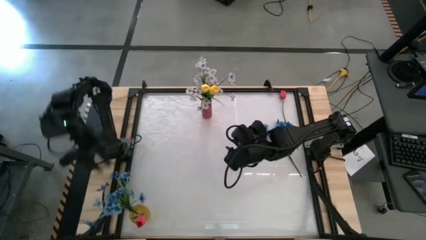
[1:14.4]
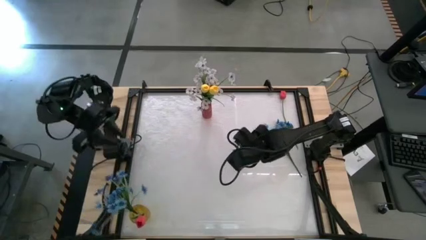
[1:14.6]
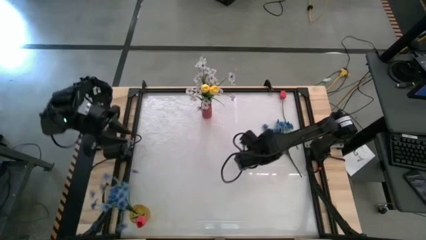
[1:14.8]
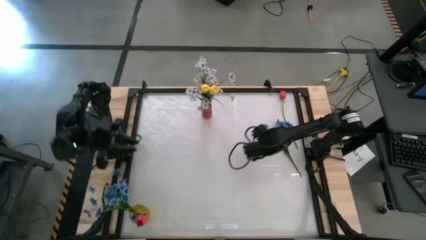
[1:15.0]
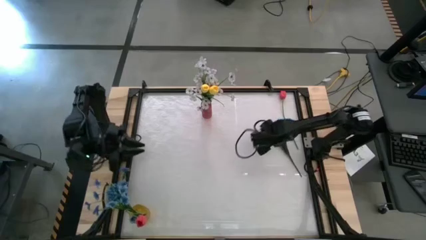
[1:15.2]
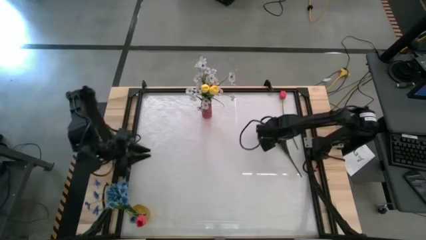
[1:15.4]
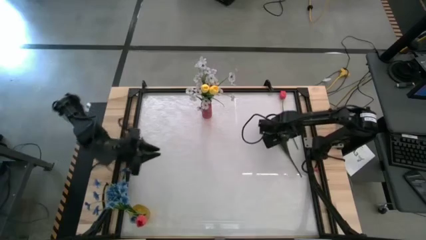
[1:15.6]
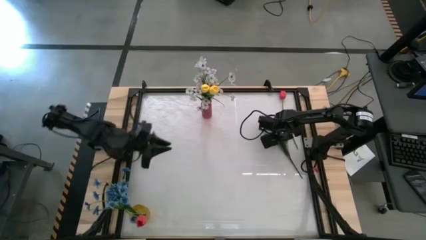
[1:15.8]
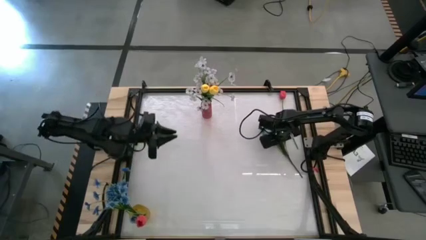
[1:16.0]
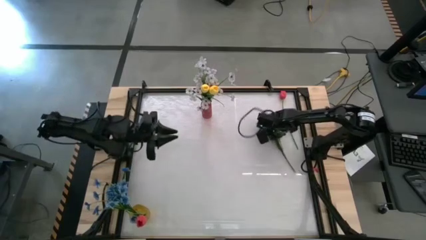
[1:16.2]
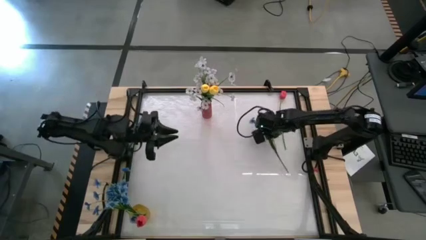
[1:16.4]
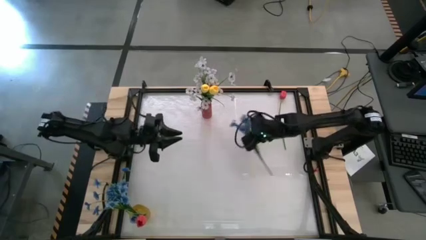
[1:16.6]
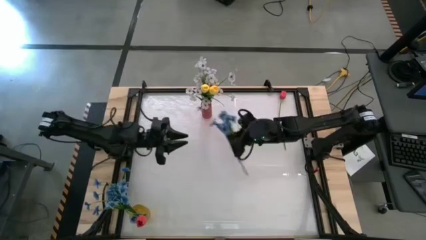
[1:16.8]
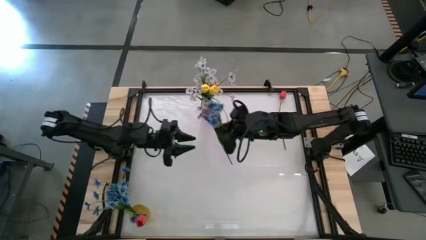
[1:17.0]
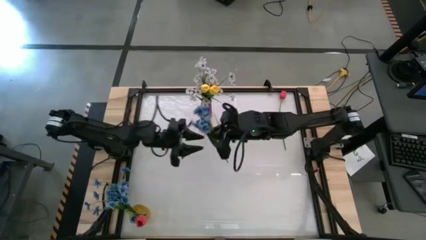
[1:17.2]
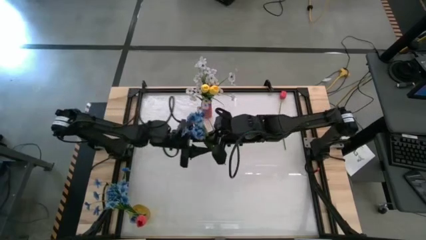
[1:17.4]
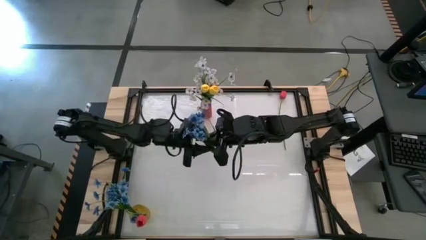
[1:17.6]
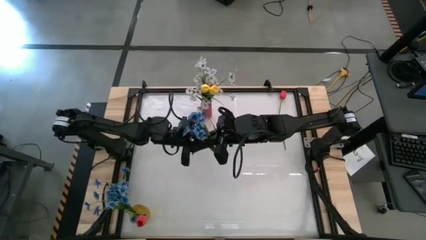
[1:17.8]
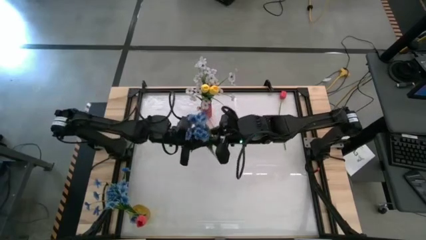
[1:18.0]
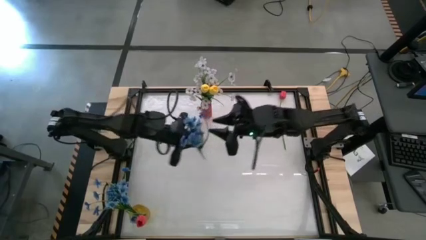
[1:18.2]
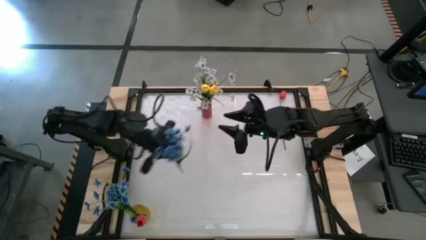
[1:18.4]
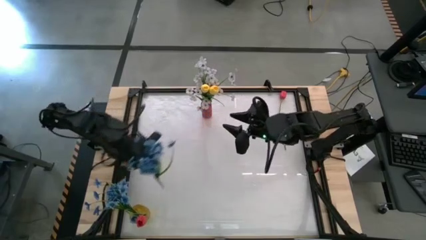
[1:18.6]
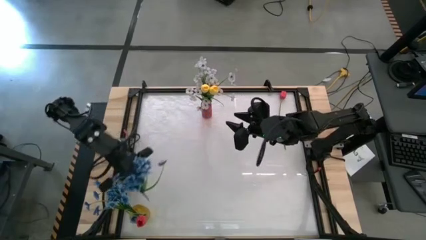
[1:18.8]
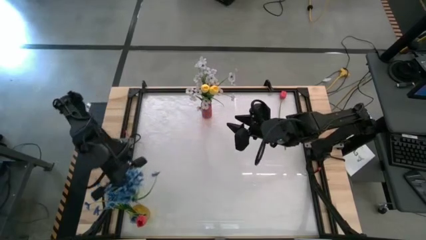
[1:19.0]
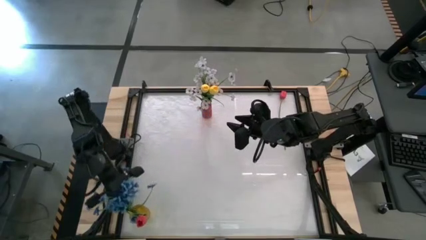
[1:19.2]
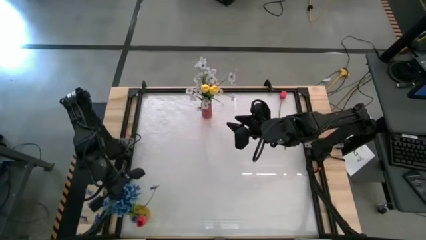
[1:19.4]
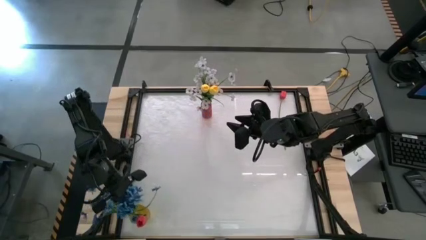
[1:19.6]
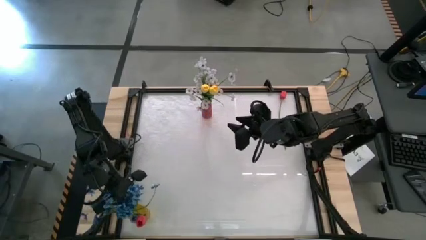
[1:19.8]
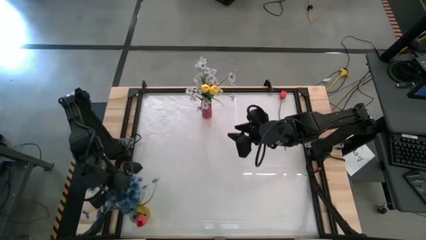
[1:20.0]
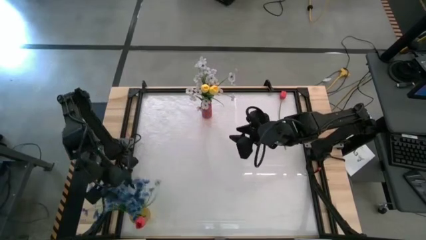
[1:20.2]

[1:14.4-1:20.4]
Task: Sort flowers into vase by color
Put the blue flowers into the yellow vase

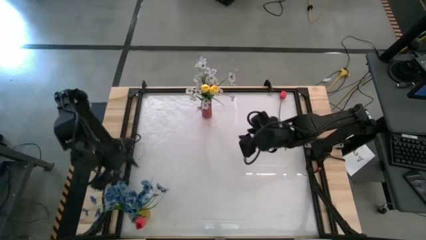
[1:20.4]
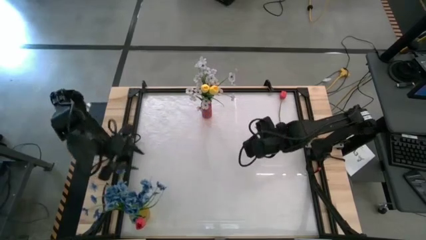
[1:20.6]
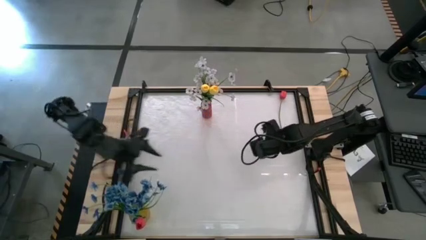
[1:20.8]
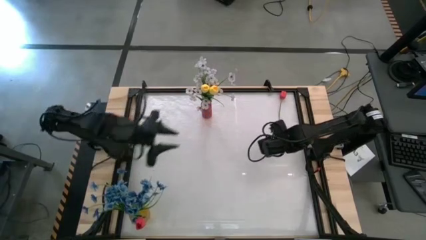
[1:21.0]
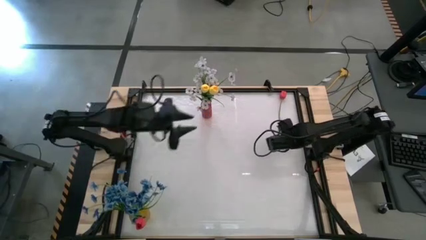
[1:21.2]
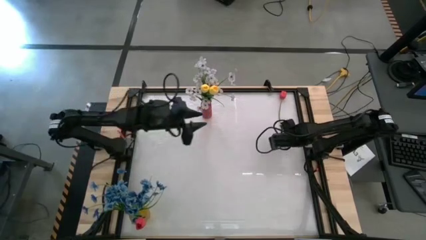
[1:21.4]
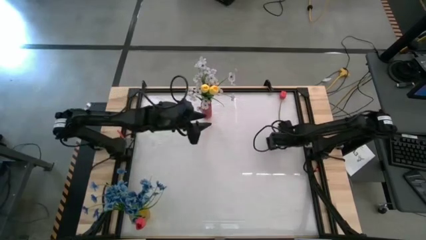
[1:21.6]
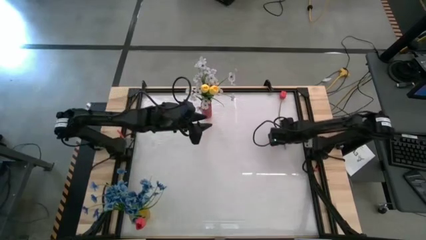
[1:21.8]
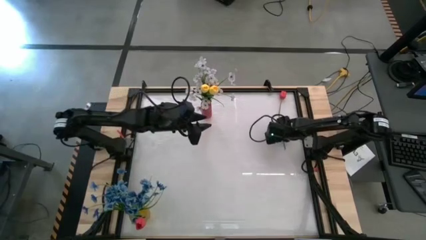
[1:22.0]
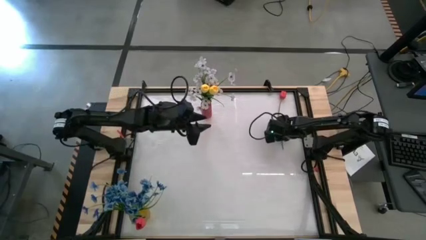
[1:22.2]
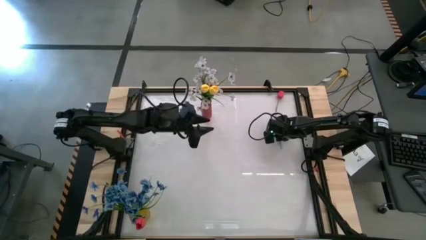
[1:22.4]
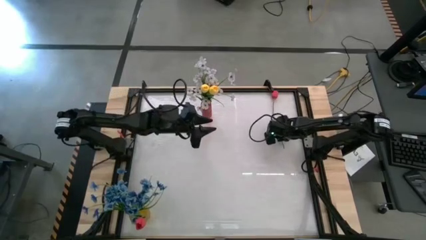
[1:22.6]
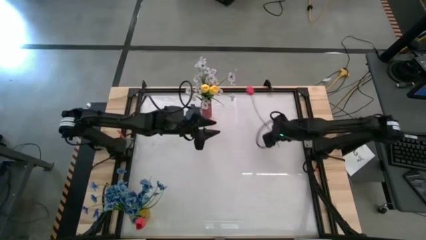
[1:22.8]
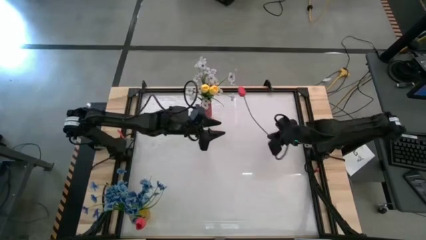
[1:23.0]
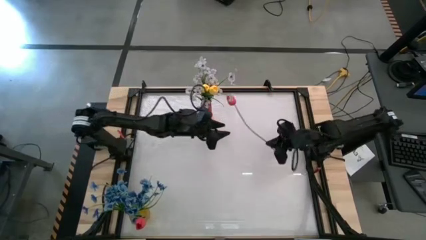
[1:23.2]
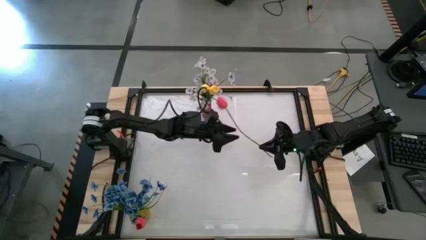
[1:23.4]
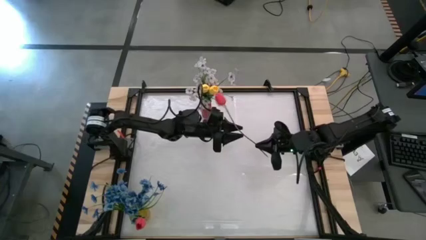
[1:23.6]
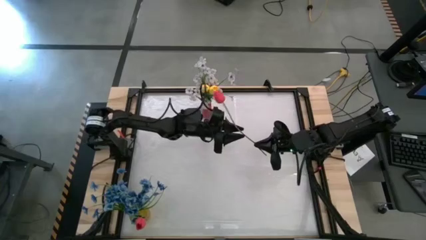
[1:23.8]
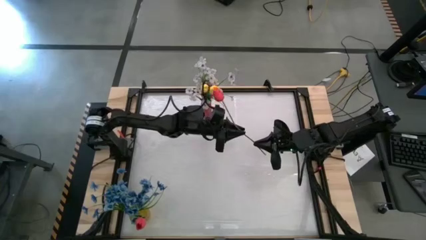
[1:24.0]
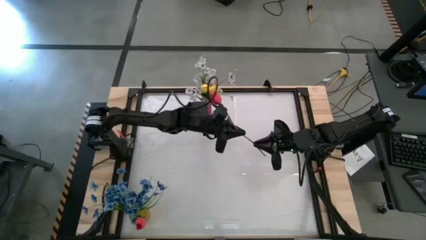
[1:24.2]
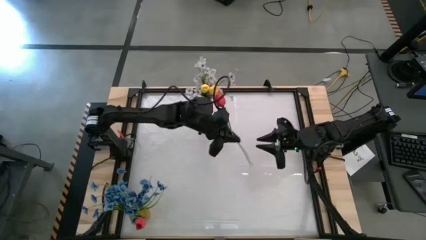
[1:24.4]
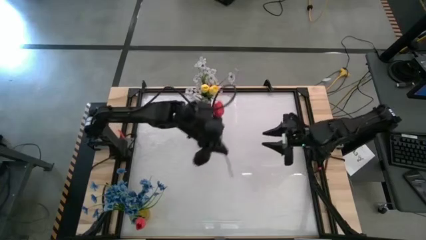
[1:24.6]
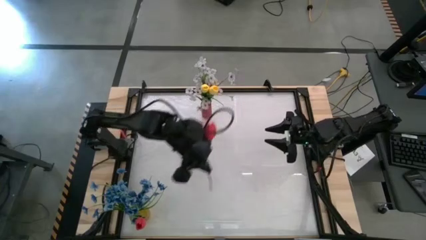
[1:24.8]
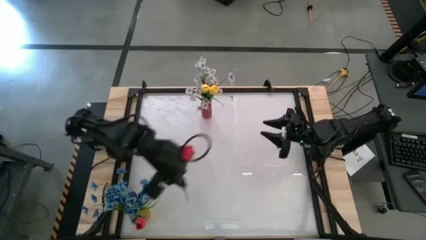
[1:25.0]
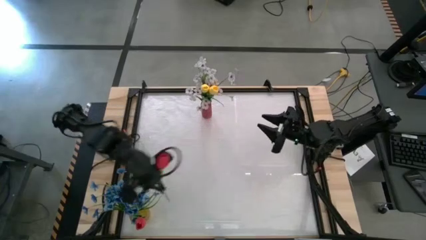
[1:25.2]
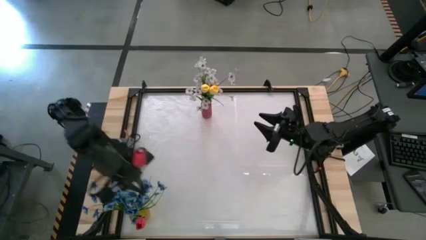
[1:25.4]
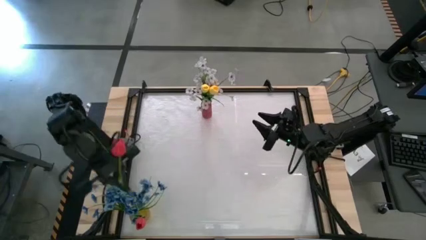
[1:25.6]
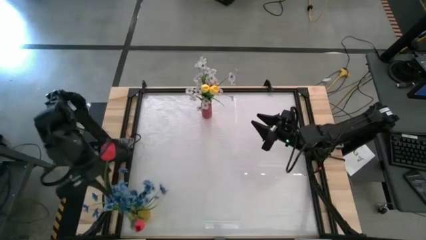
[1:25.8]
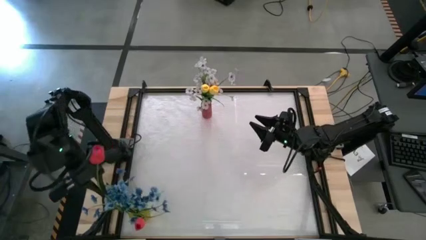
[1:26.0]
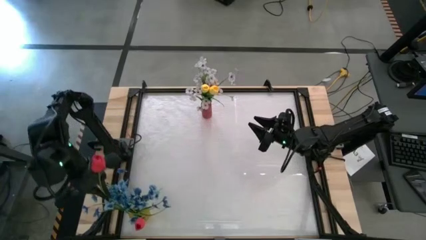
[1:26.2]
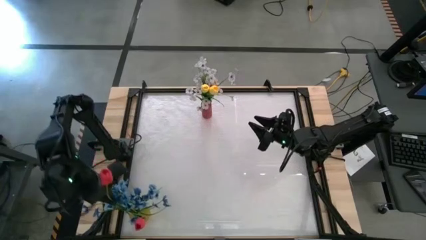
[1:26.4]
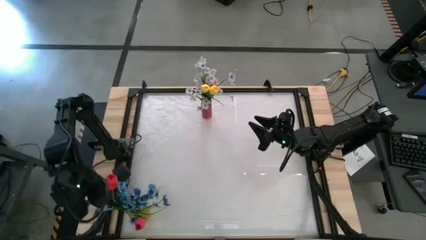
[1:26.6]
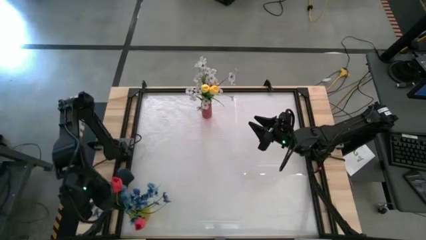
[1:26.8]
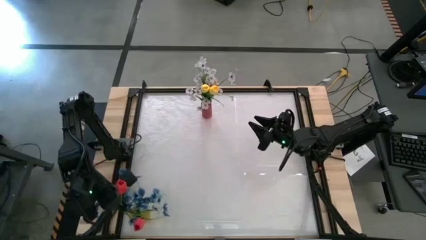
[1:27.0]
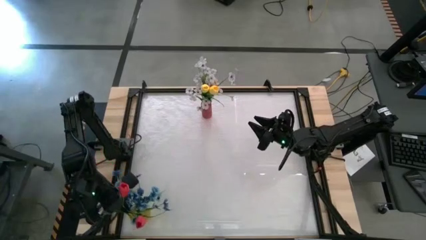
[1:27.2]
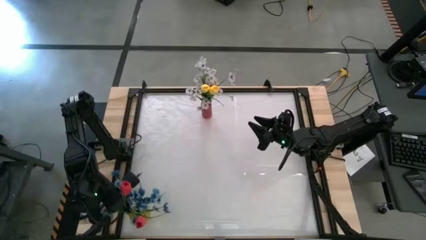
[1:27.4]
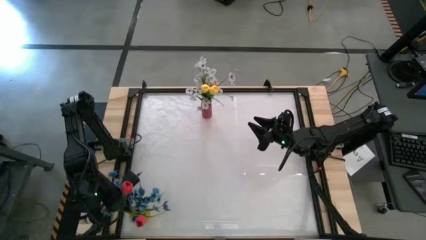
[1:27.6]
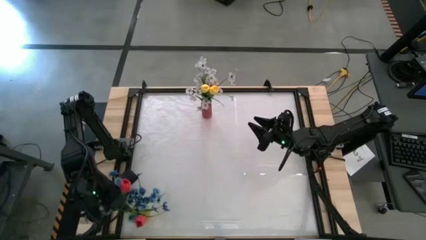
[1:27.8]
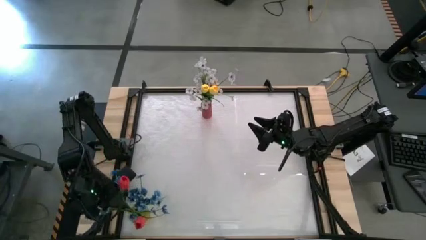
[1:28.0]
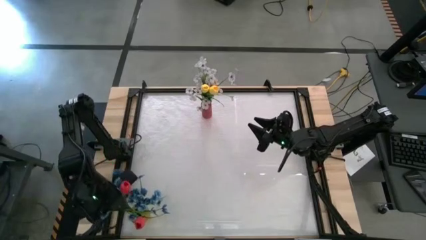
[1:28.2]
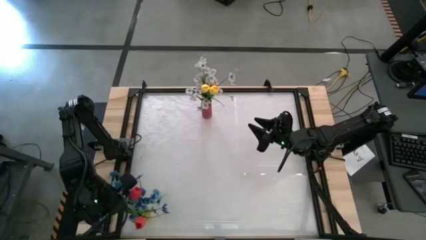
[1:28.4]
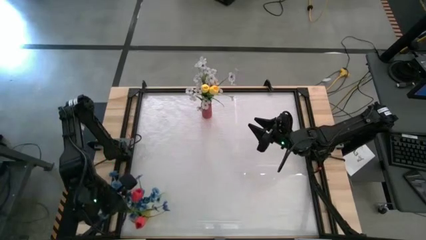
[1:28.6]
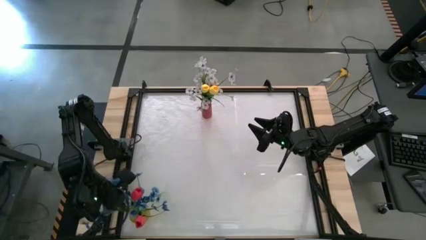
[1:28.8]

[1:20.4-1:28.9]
Put the pink flower into the yellow vase

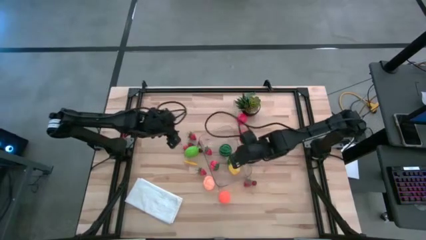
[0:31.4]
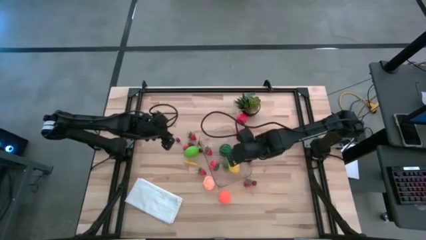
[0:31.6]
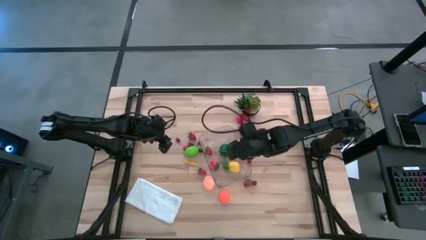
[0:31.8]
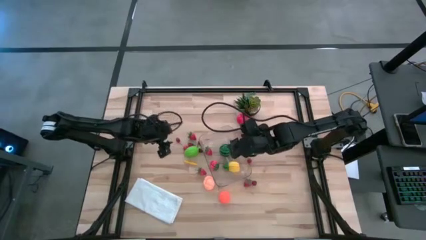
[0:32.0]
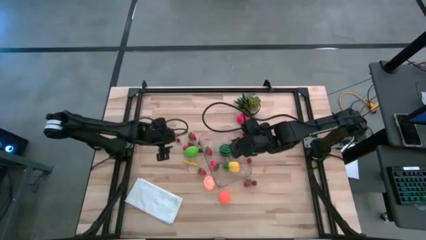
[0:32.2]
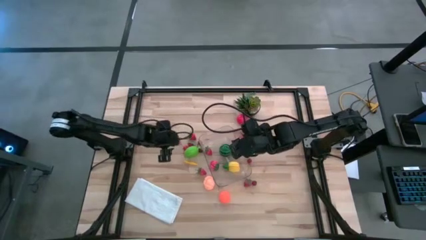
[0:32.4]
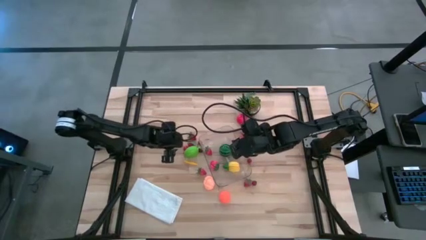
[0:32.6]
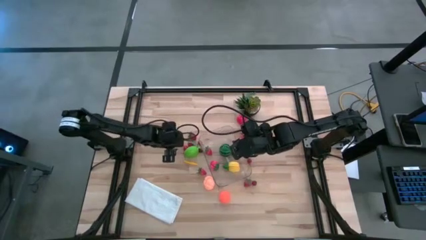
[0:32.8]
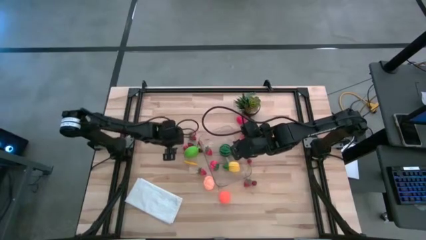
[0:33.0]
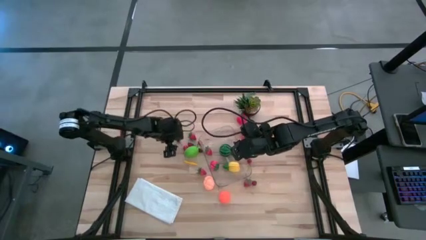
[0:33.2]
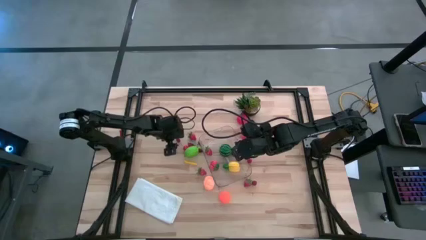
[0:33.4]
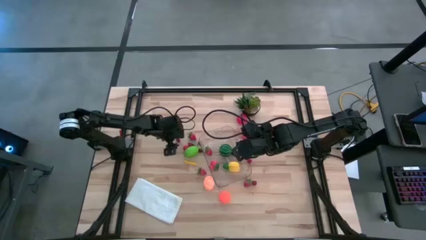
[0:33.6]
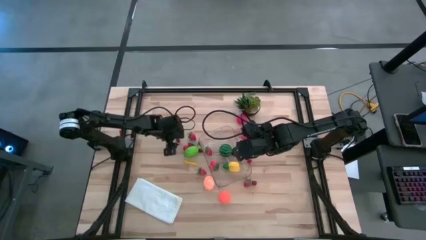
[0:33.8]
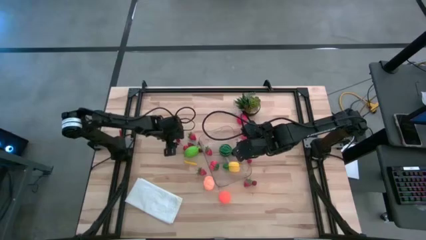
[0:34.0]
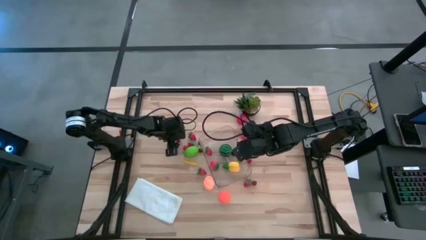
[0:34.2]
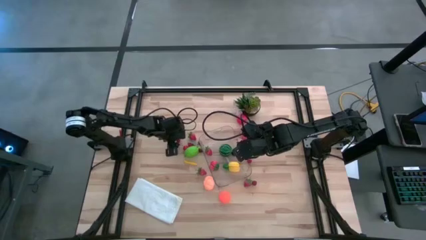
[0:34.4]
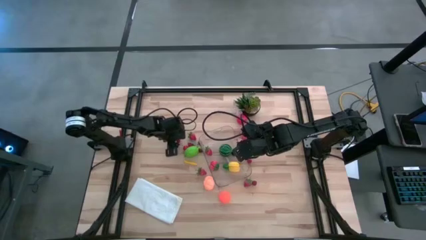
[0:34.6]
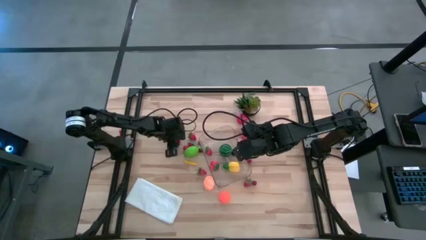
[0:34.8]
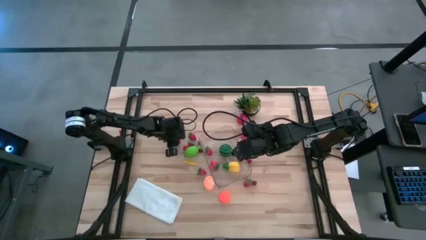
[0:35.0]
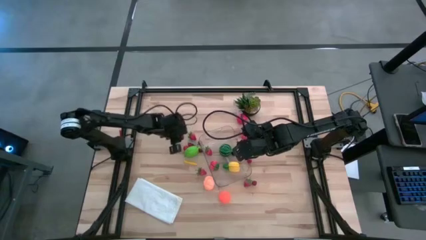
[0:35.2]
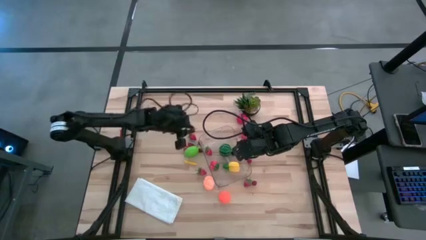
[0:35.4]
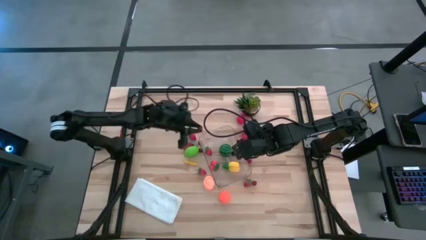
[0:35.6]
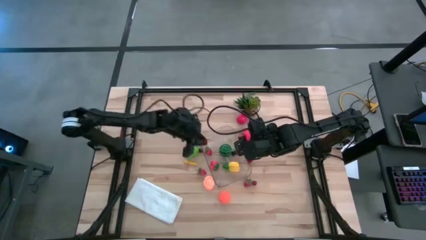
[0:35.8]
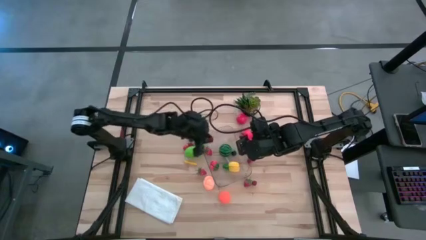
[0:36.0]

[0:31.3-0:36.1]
Task: Pick and placing Produce into tupperware
Put the red cherry into the transparent bin
